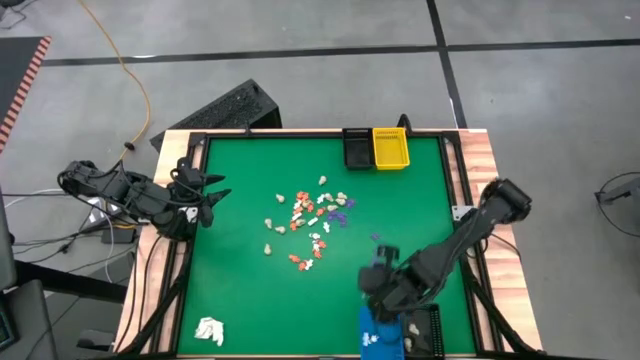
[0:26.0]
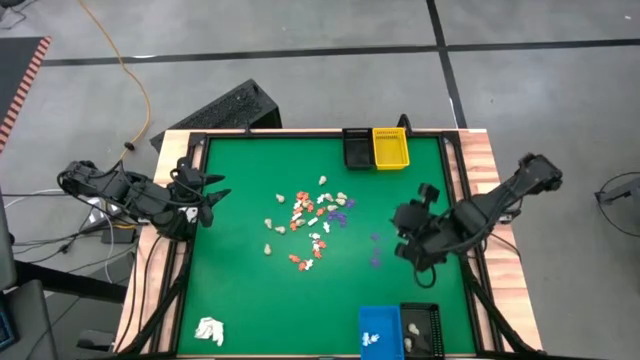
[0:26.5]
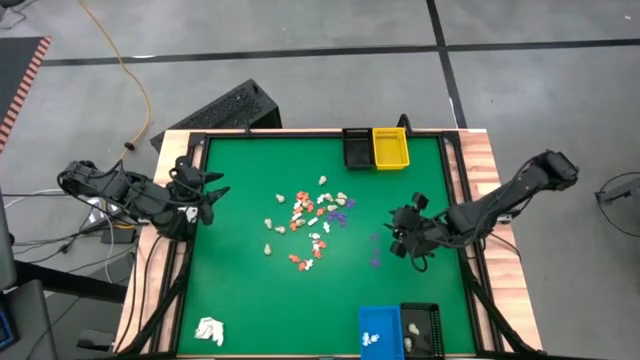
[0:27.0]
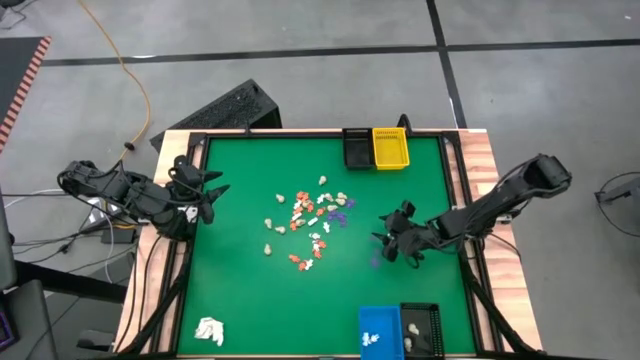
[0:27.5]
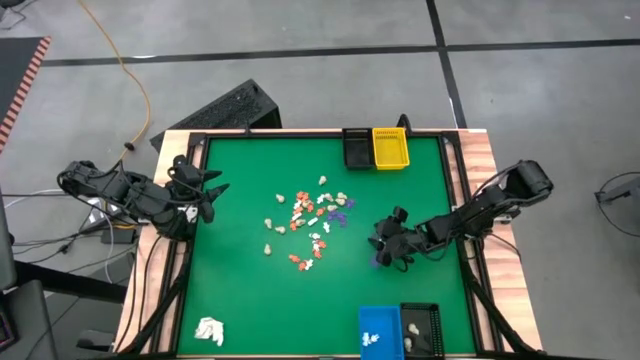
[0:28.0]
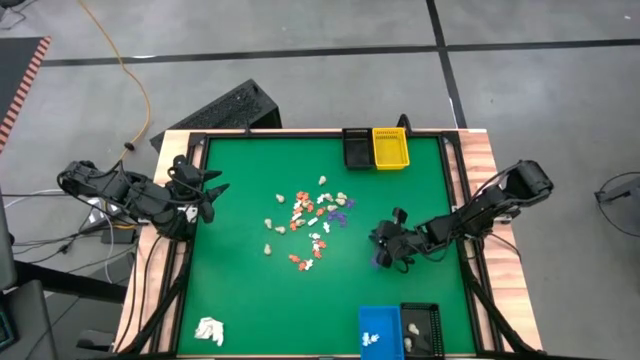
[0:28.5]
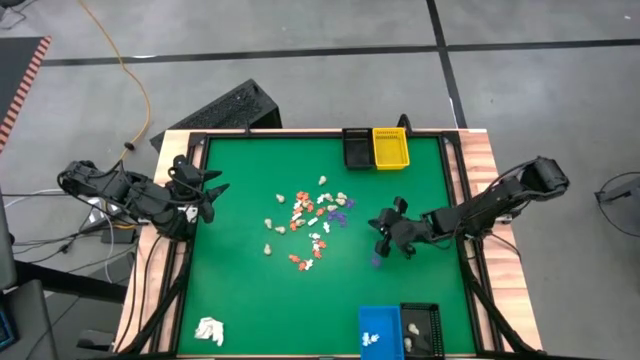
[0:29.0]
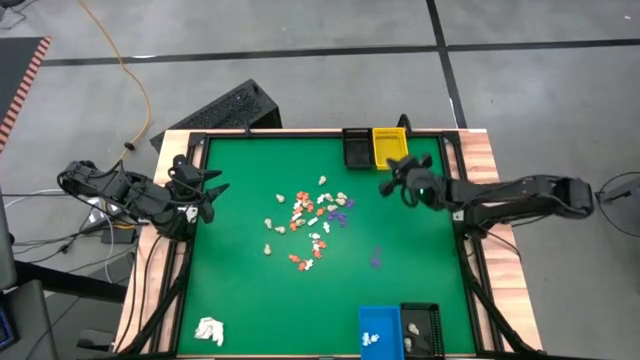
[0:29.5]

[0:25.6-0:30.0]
Task: Sort Halloween decoration
Put the violet spider toy into the yellow basket

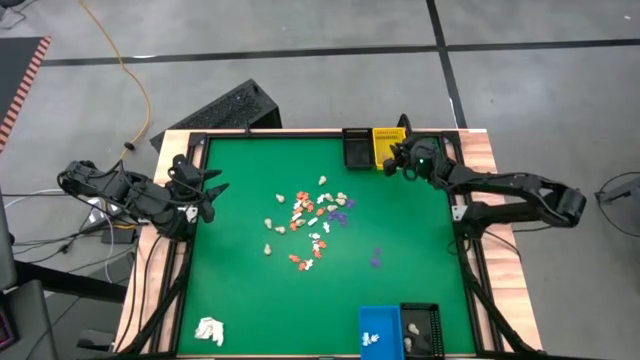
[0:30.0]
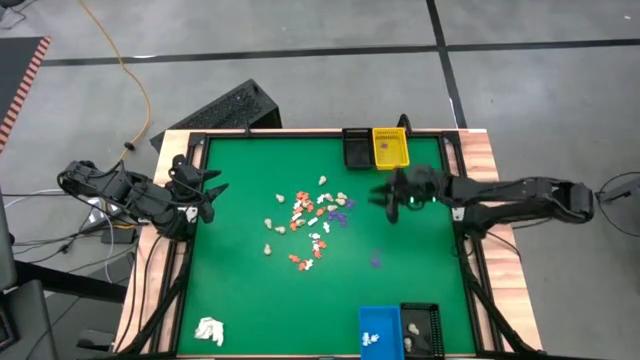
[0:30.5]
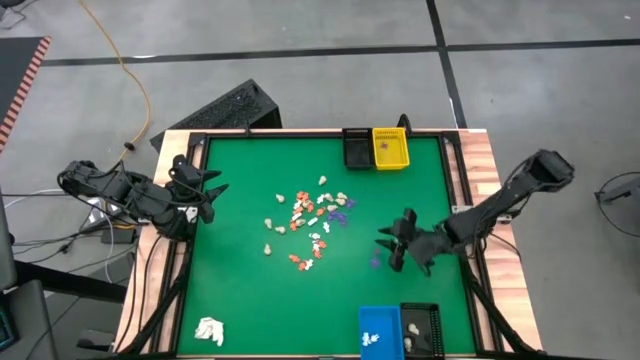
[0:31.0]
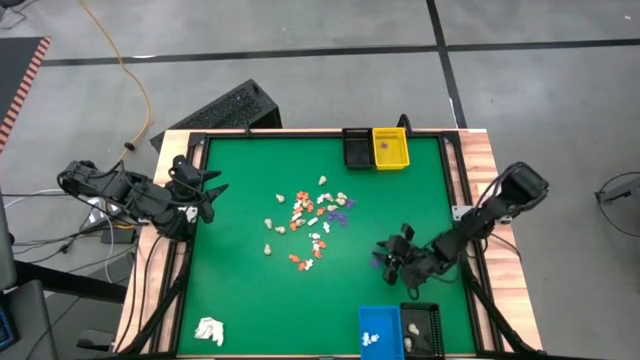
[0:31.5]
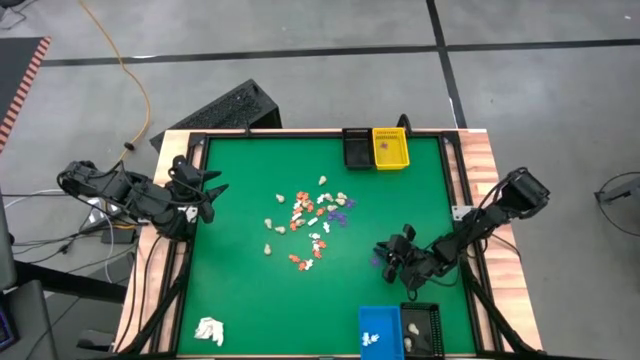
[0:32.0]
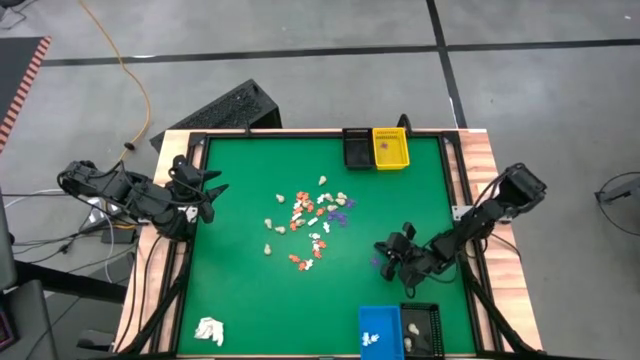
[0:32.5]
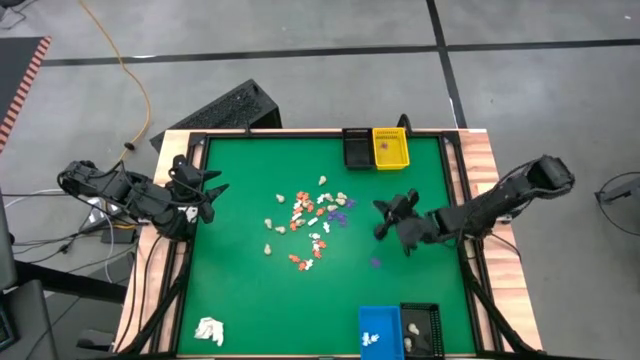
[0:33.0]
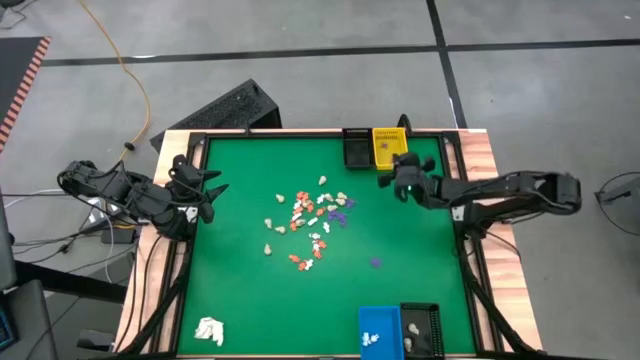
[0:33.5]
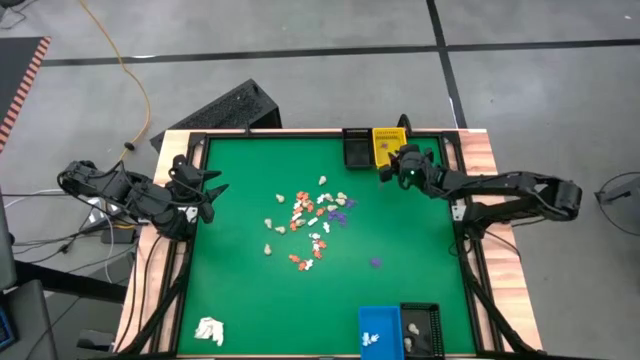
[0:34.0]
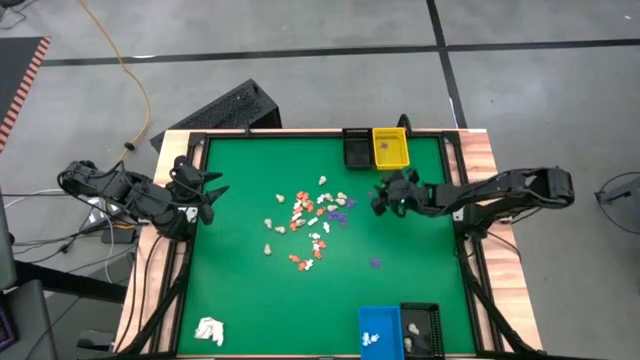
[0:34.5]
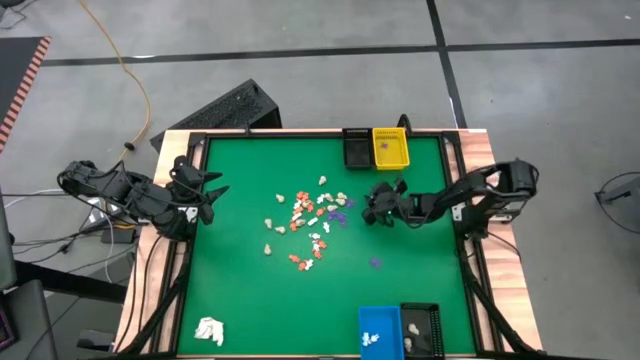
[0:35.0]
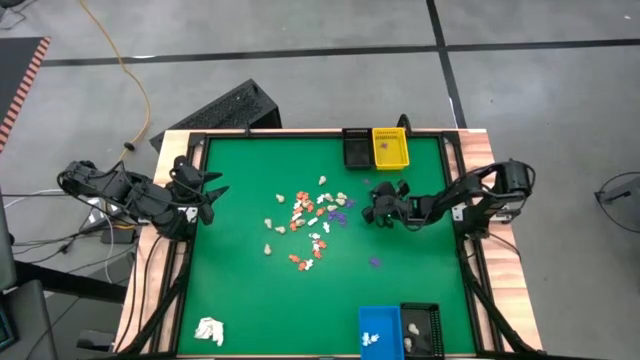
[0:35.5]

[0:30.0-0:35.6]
Put the violet spider toy into the yellow basket

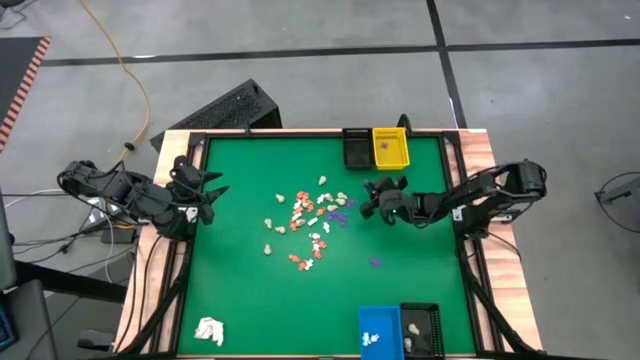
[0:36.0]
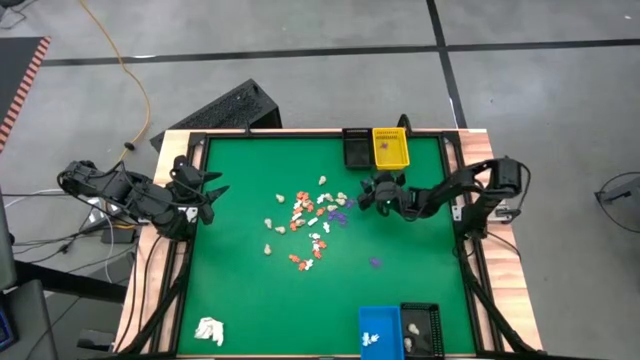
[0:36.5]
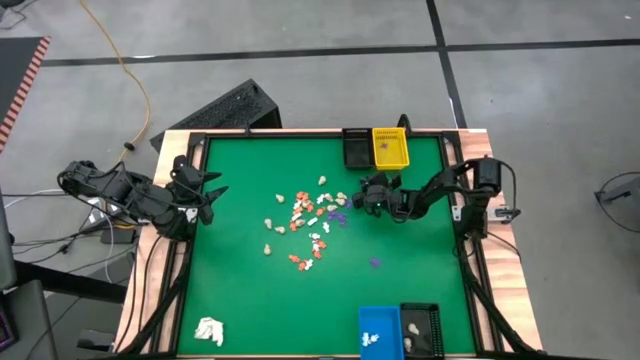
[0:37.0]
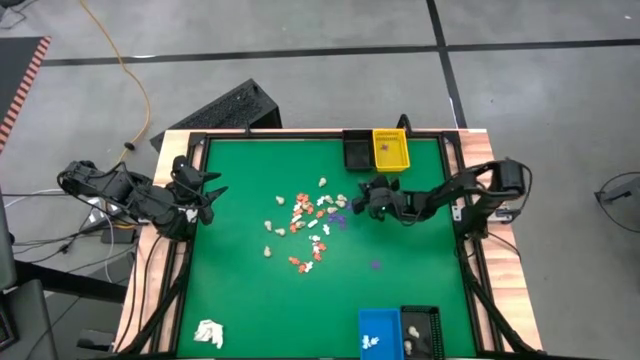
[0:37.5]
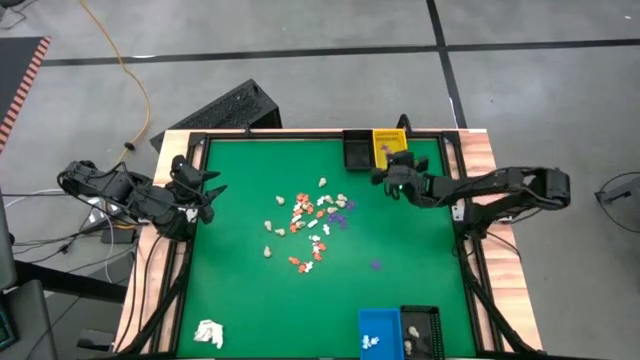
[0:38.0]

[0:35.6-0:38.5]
Put the violet spider toy into the yellow basket

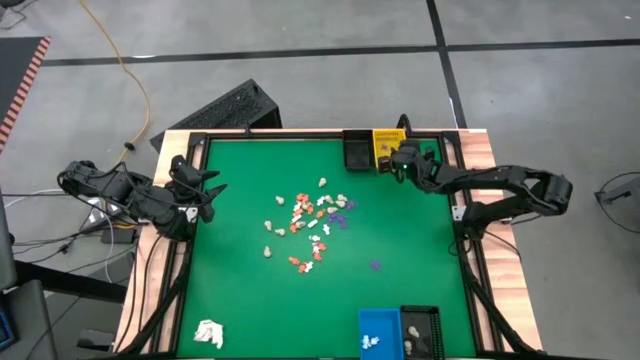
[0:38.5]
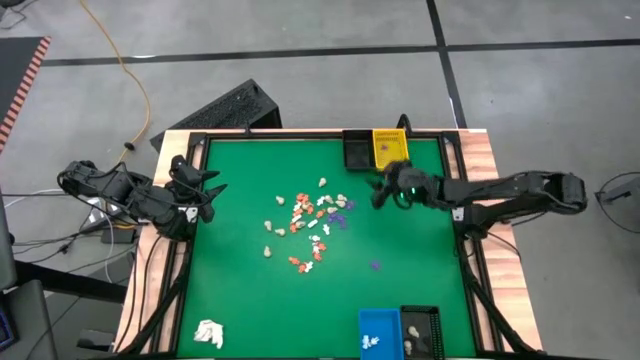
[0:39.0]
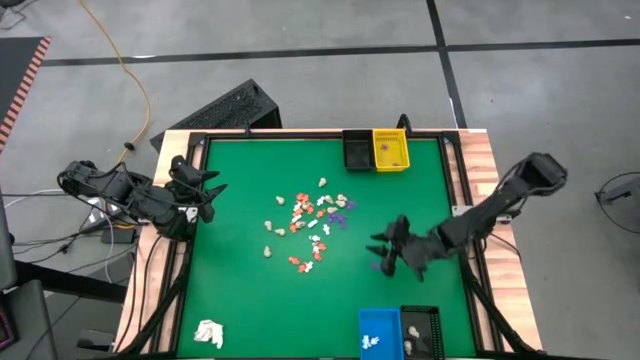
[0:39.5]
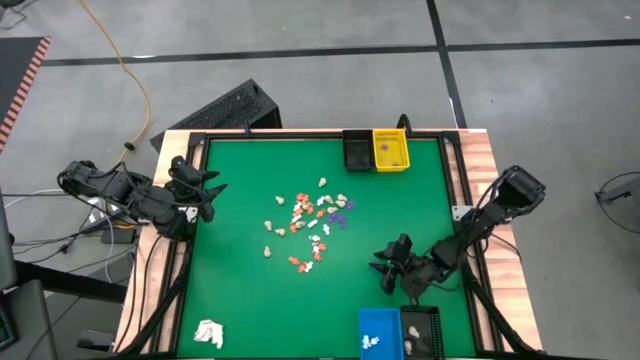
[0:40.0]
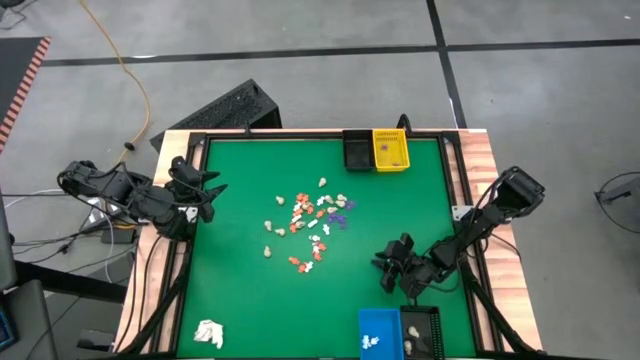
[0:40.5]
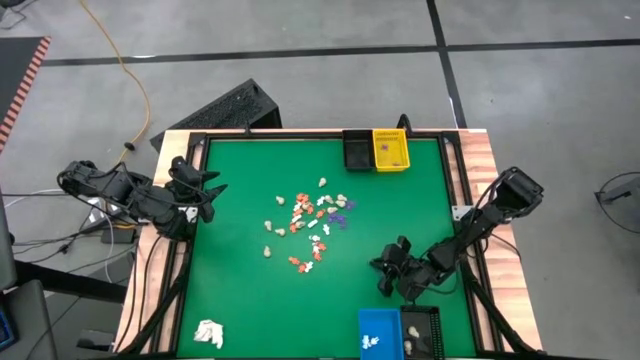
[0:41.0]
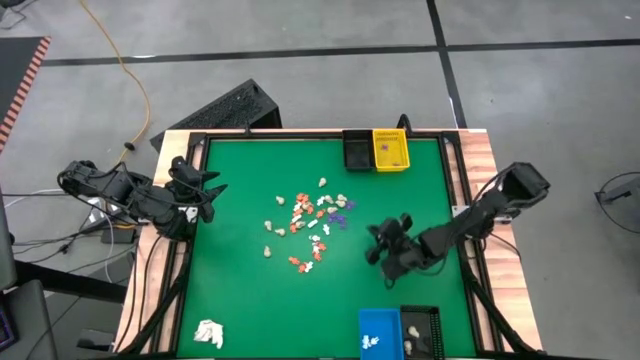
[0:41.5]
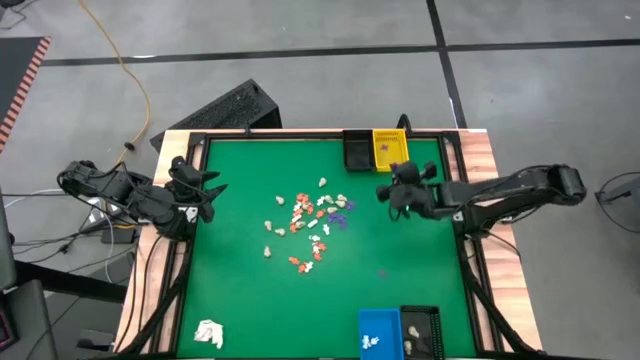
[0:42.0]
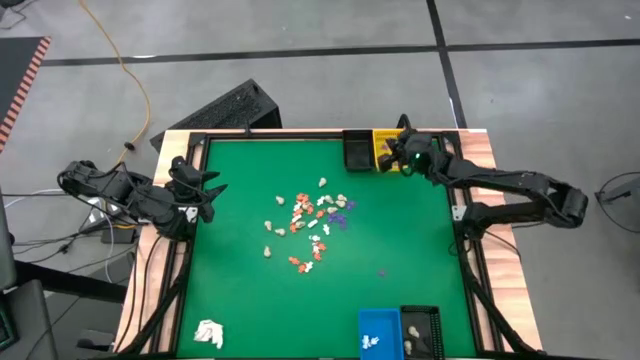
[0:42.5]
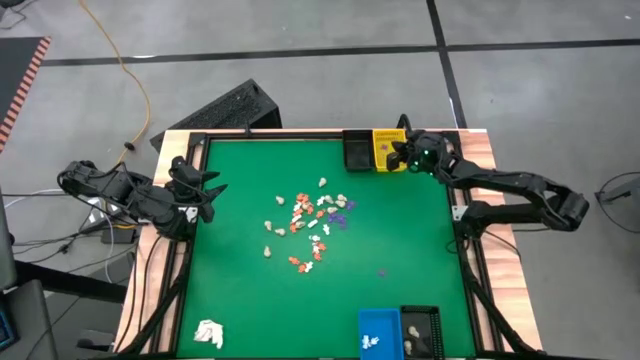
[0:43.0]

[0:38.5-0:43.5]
Put the violet spider toy into the yellow basket

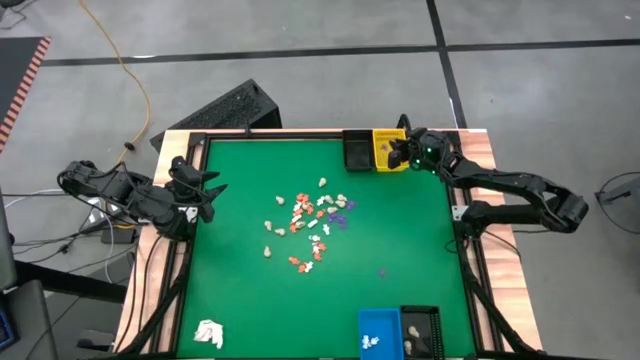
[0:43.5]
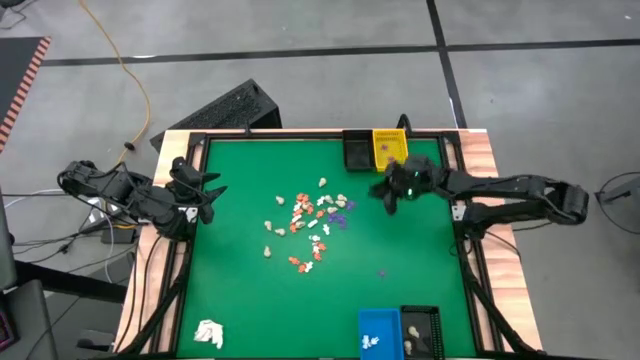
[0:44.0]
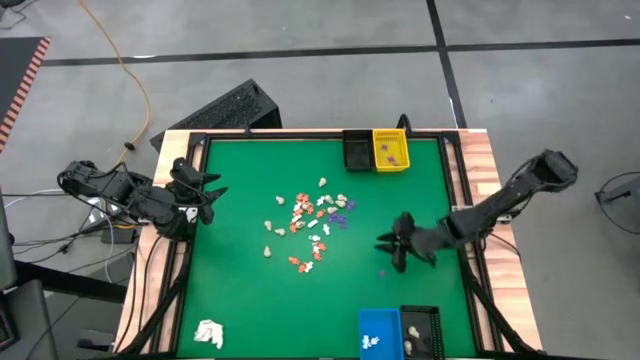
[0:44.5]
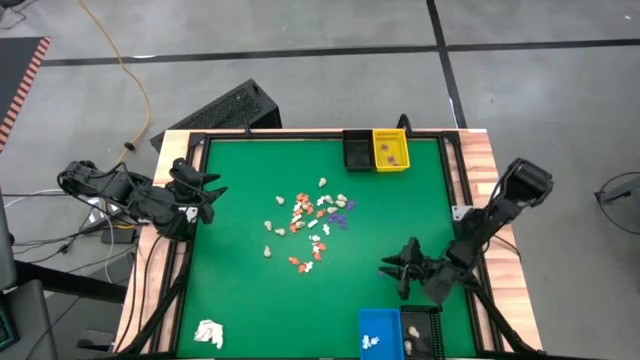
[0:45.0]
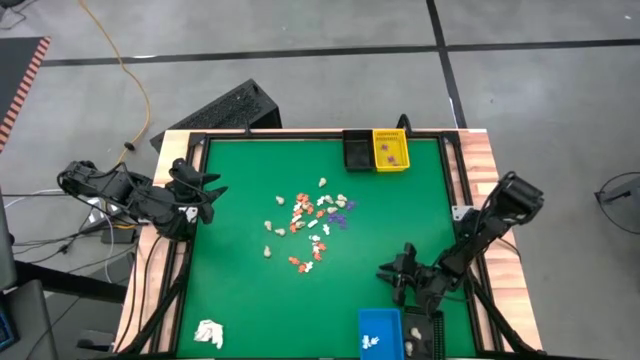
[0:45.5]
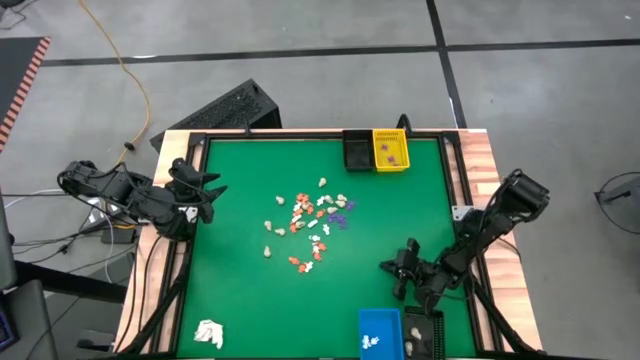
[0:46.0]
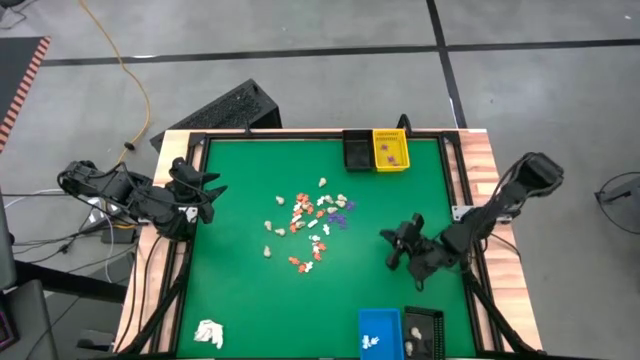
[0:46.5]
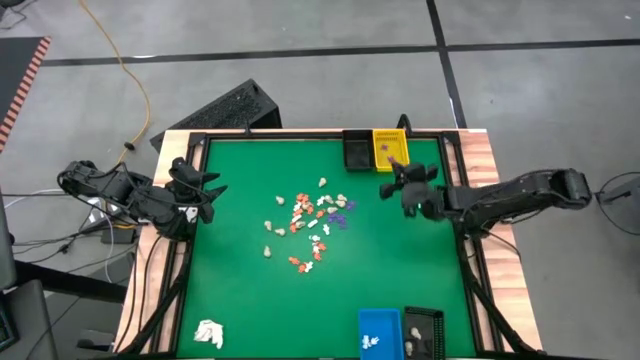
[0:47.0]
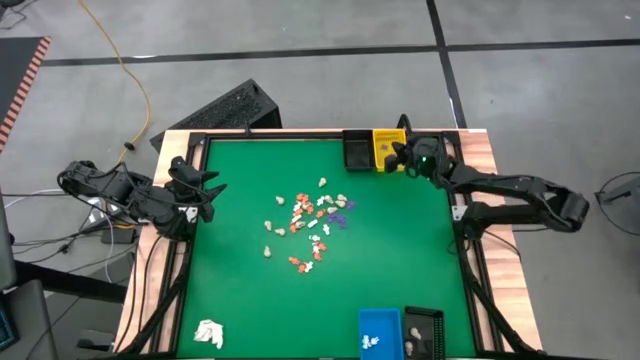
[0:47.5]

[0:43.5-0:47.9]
Put the violet spider toy into the yellow basket
